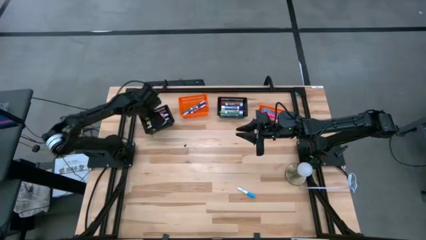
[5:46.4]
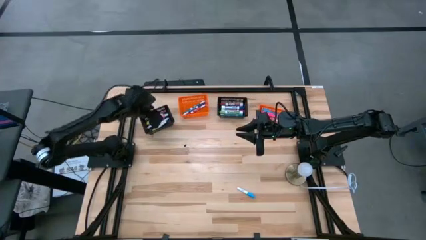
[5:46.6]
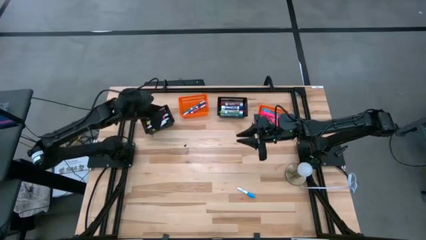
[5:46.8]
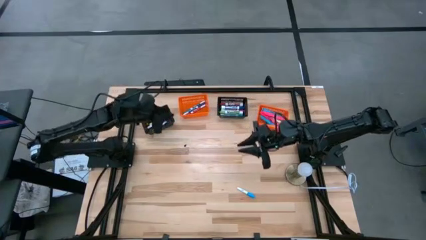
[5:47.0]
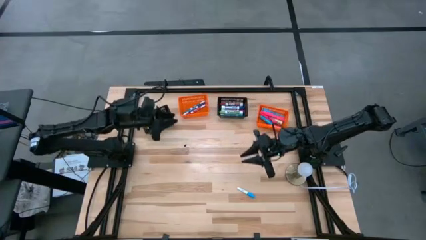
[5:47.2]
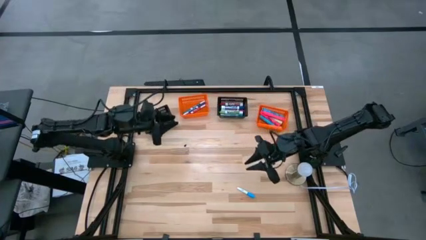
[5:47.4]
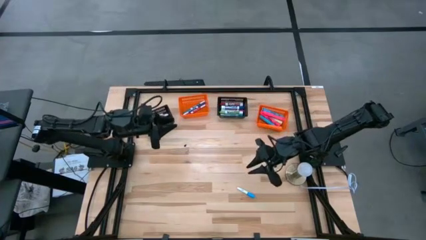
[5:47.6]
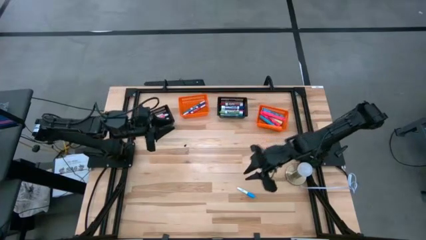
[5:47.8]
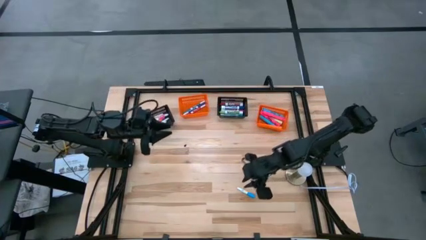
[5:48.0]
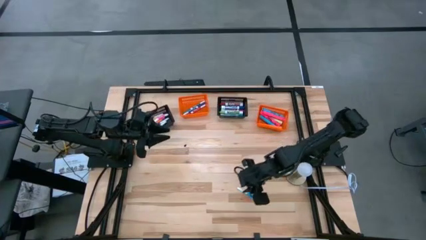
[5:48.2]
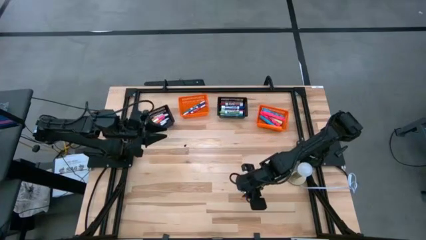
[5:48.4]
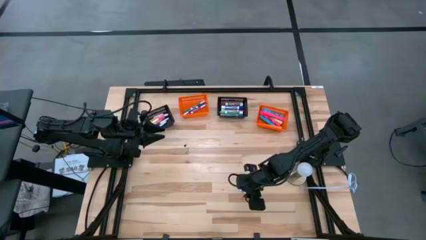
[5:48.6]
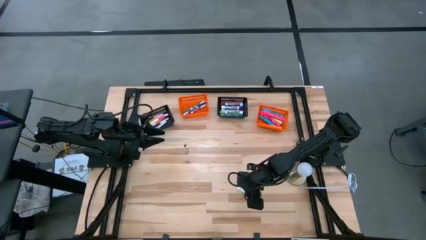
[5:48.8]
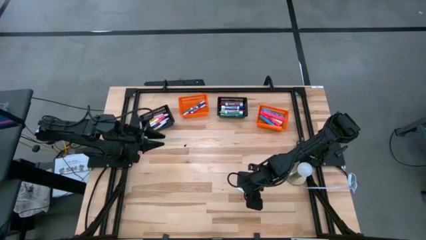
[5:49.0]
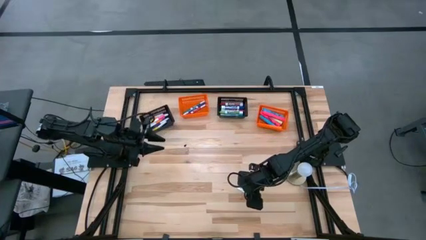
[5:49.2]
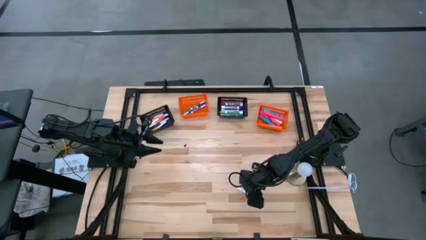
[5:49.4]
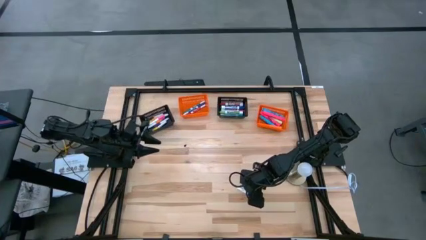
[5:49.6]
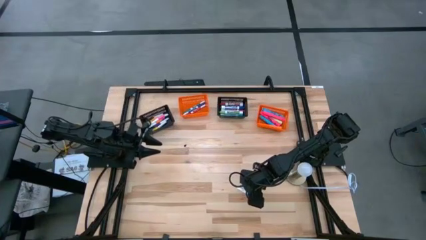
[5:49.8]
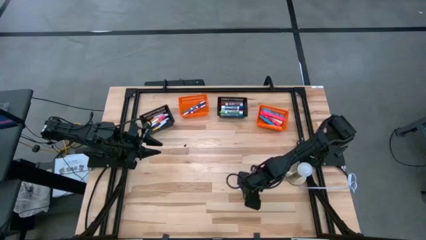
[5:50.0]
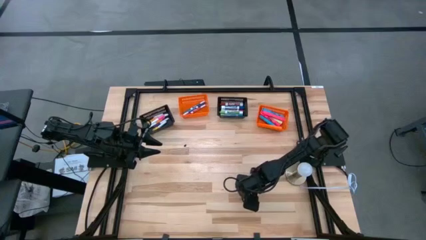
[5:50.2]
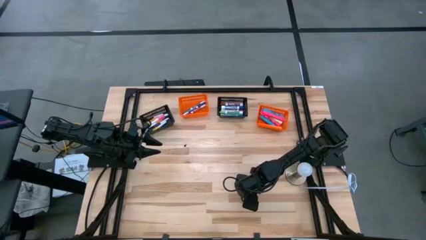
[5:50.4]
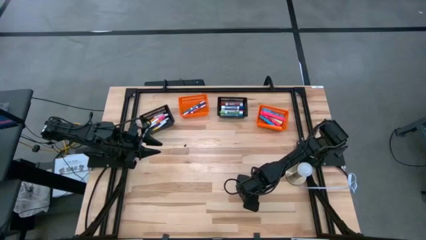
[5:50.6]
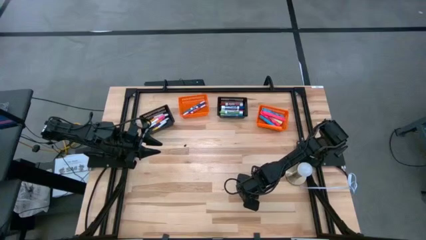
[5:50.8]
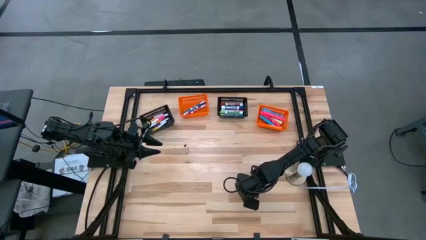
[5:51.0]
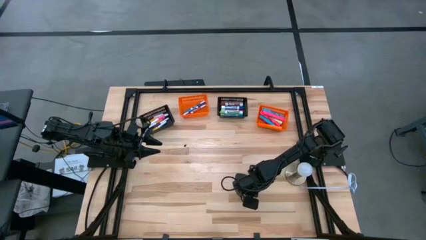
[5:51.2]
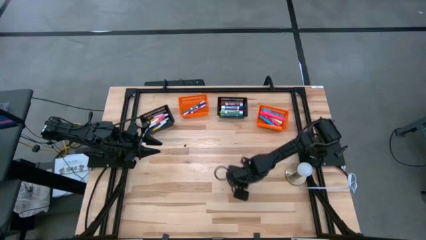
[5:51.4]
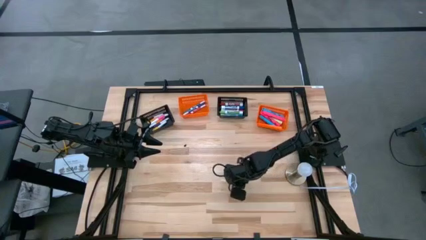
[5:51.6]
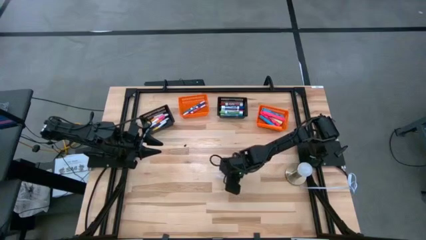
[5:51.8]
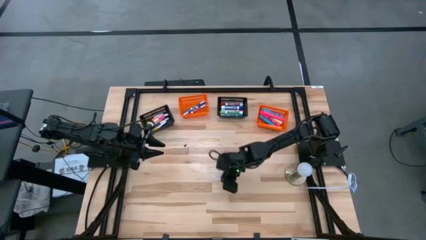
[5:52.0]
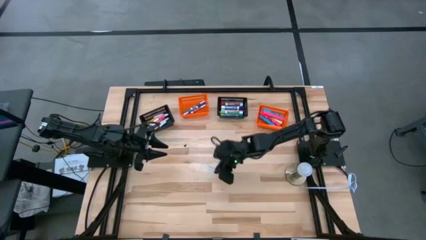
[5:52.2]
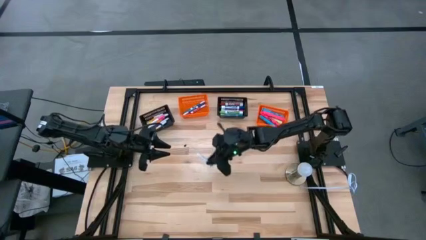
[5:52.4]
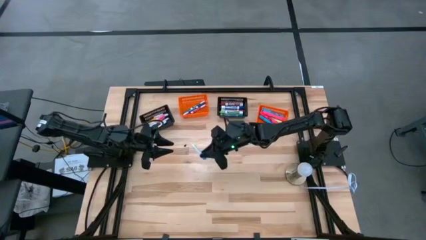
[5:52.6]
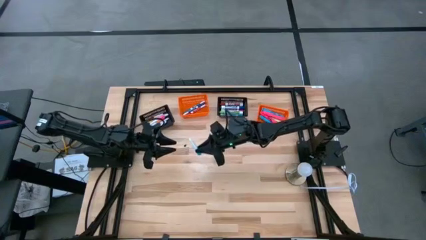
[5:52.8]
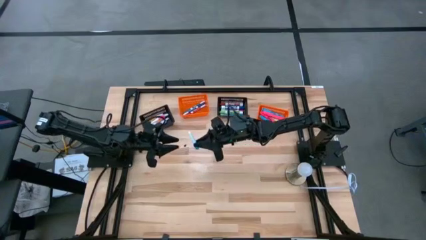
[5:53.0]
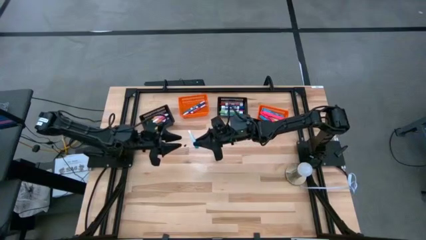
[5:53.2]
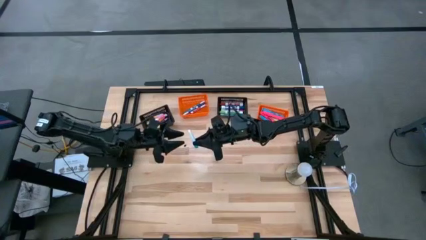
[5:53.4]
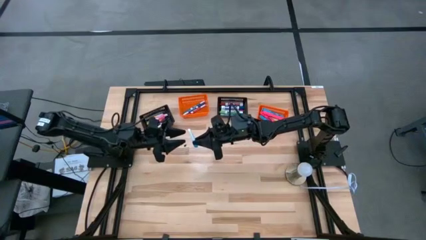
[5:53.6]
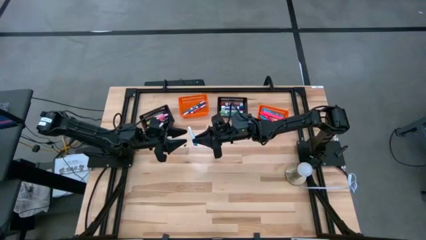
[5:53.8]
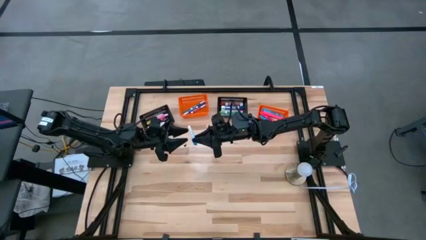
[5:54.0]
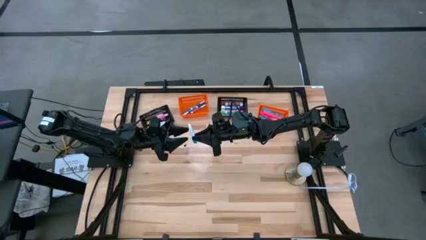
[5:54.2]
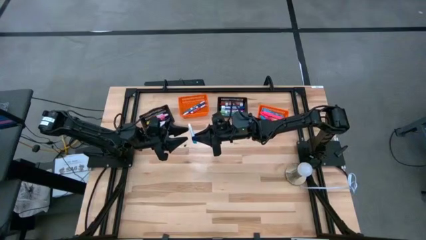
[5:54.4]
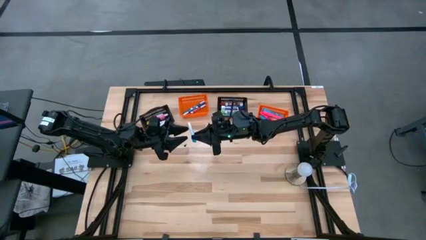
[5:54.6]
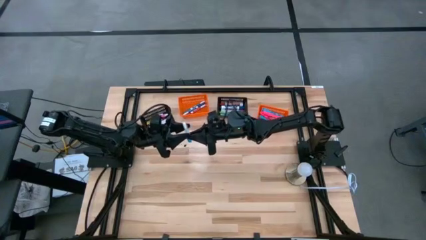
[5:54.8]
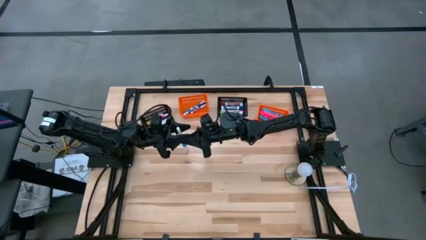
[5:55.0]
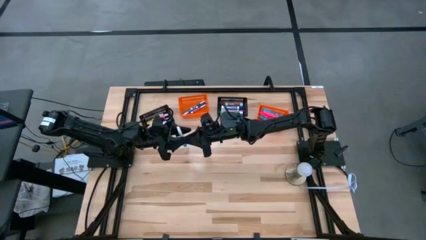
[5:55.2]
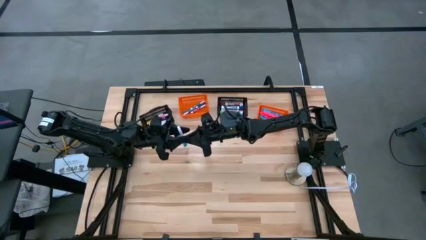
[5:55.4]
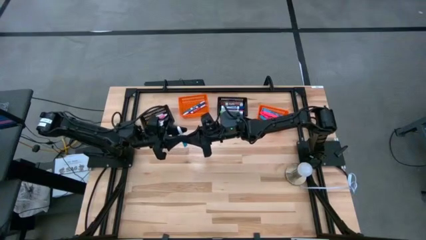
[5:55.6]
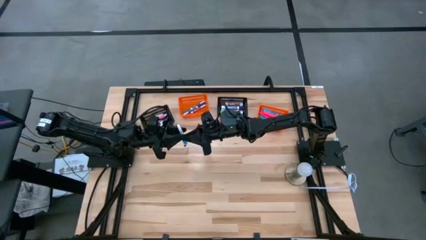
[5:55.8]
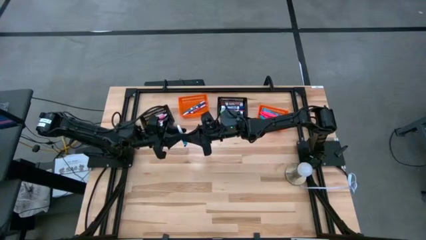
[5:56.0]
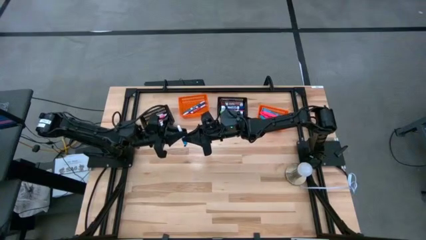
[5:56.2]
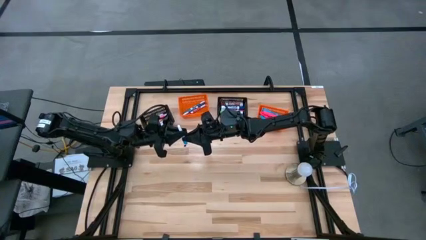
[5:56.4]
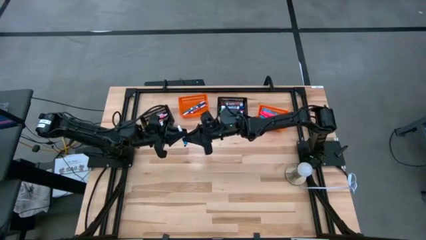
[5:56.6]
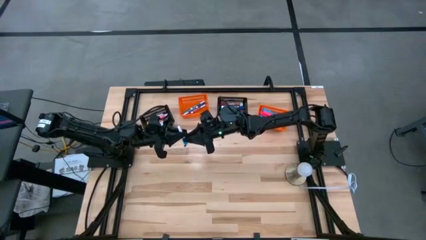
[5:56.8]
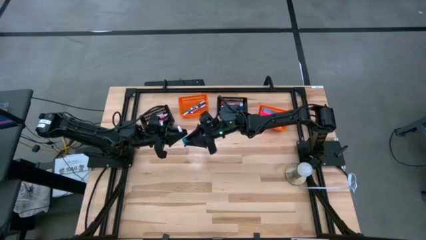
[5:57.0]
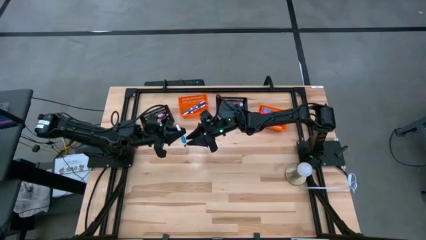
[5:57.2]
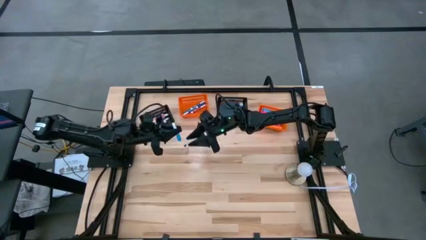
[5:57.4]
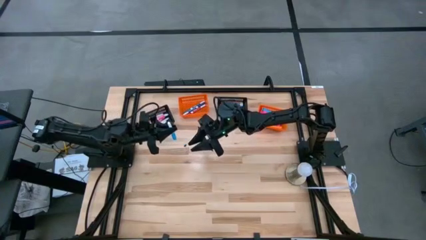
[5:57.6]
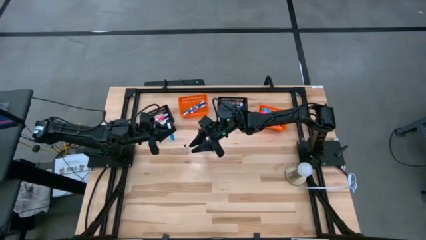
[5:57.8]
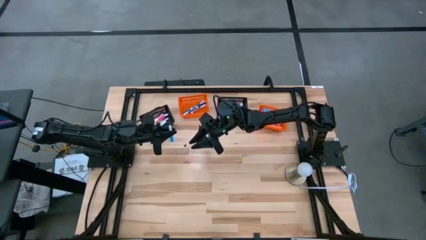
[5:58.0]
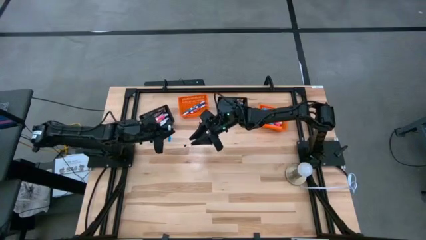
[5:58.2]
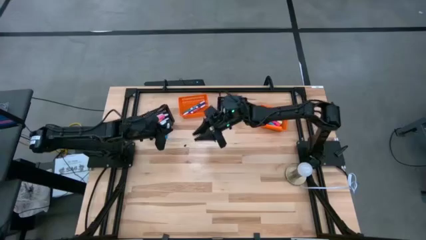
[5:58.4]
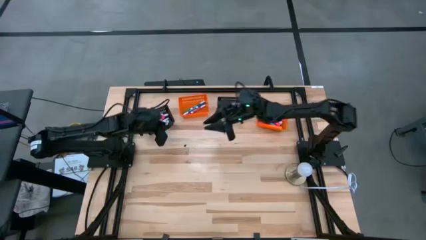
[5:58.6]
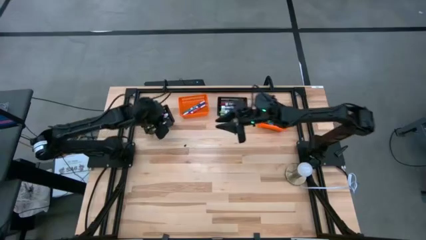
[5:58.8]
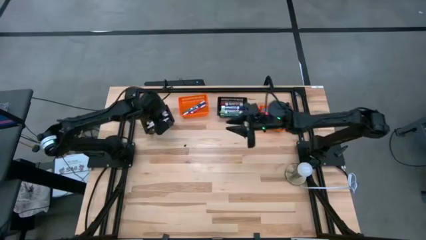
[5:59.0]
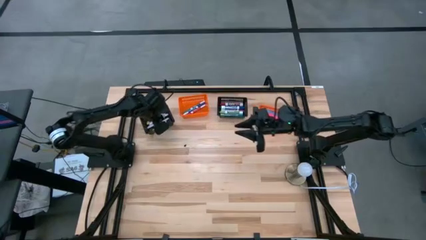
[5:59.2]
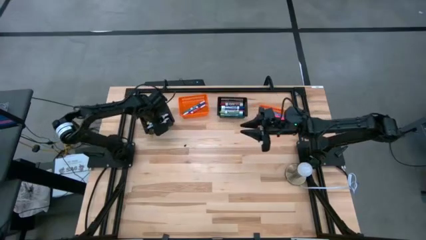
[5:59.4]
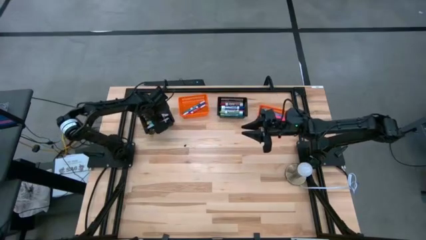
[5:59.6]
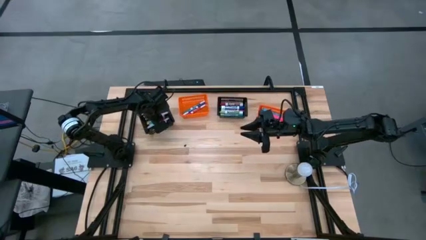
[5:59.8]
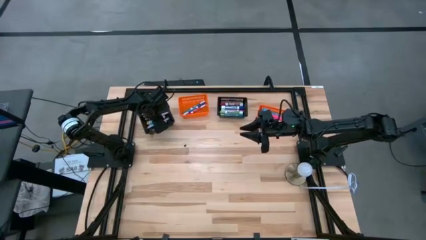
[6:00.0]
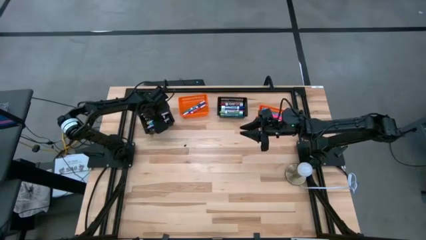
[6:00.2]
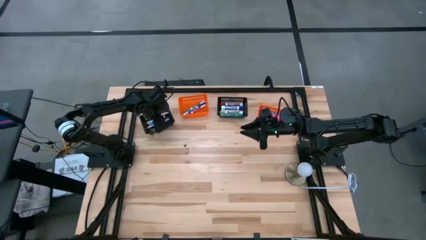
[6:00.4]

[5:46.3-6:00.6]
Task: Pick & Place Markers
Put the white blue marker into the left black bin

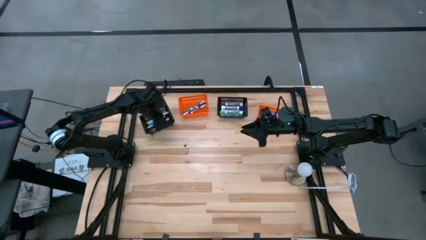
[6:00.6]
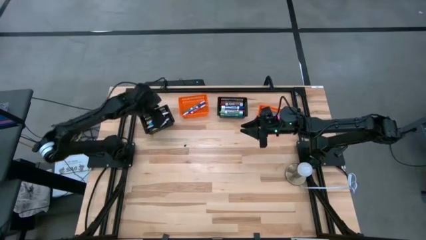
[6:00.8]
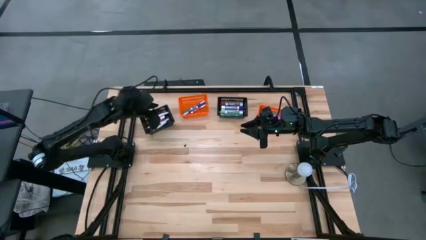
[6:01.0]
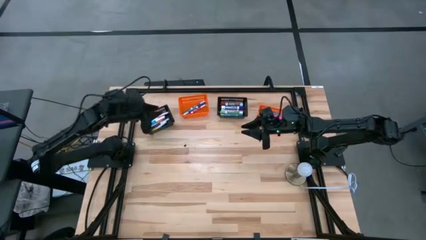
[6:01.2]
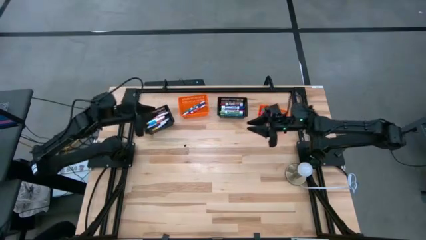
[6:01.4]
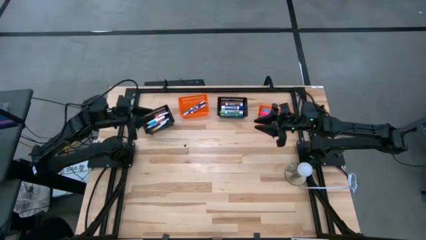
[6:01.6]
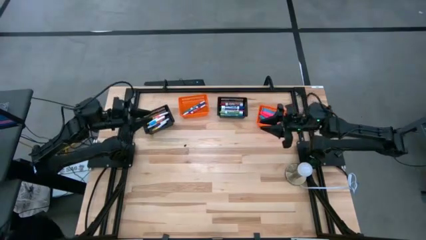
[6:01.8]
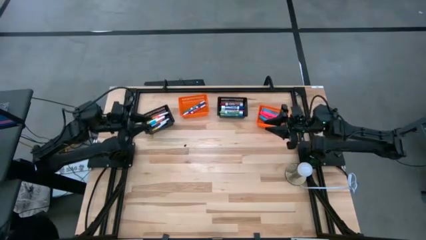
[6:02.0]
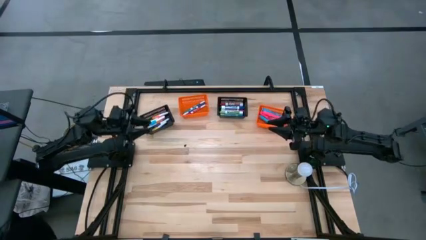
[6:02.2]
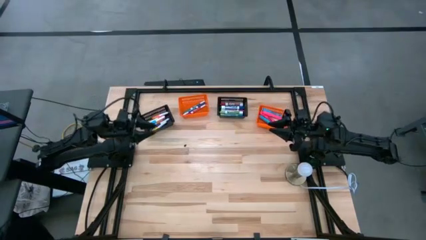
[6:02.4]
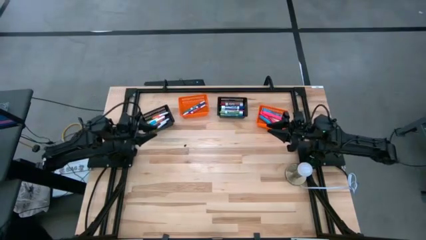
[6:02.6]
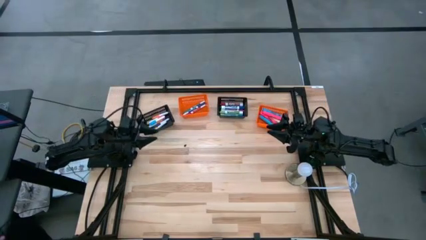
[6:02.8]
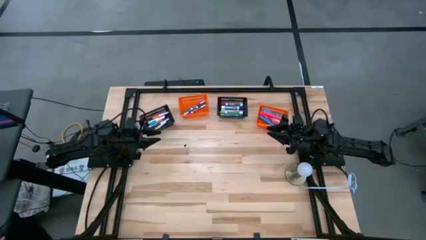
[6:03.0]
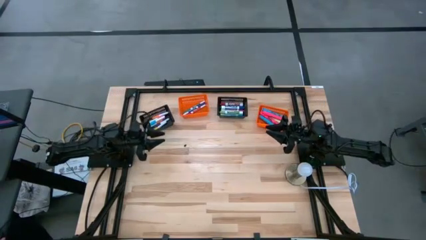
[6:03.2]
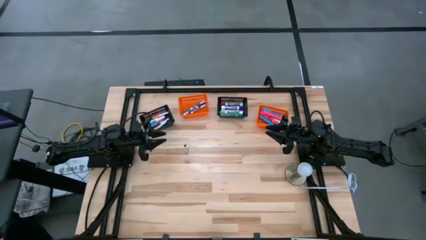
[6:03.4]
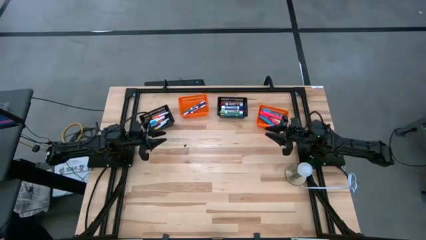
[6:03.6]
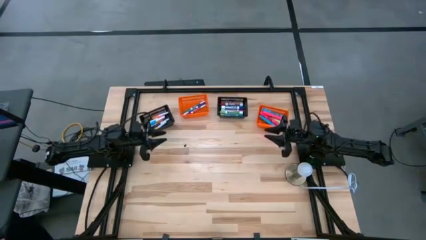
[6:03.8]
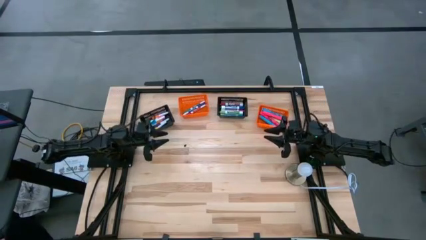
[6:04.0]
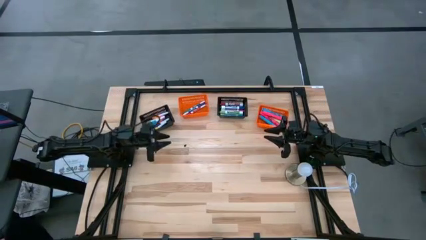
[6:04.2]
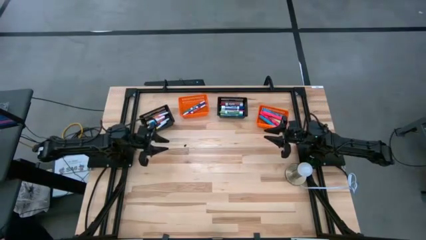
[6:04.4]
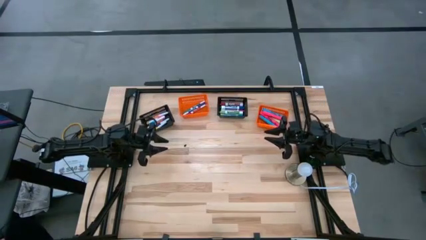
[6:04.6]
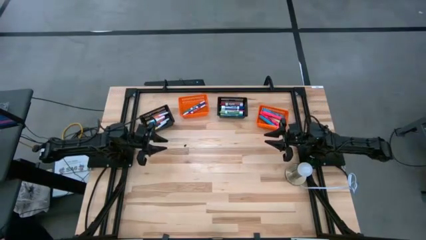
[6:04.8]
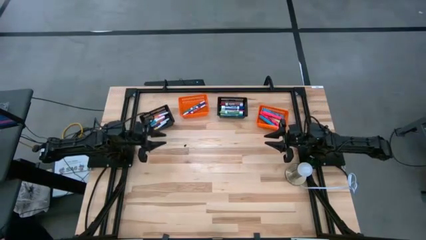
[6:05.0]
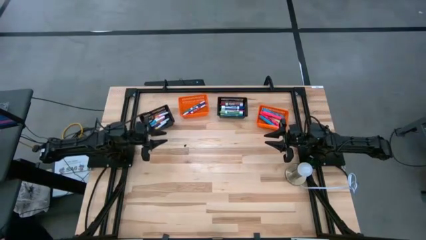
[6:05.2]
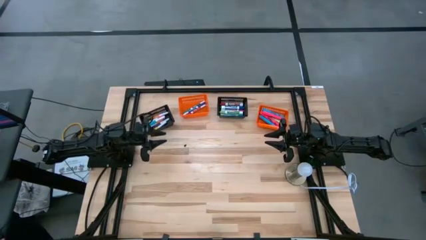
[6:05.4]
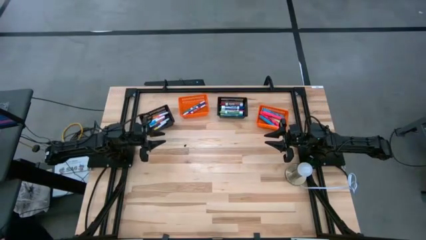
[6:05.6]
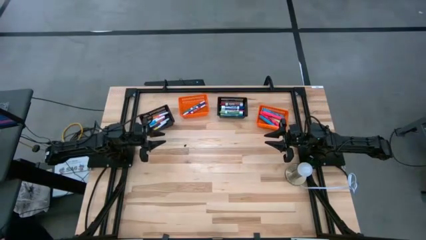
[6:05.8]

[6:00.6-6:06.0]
Return to Home Position
